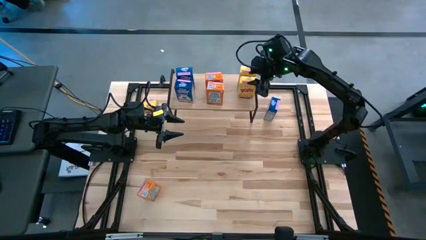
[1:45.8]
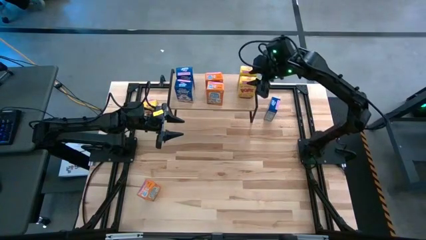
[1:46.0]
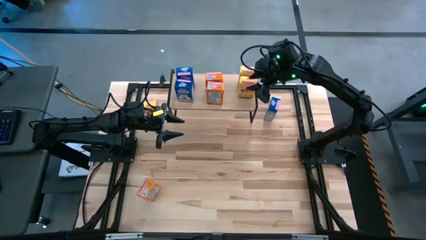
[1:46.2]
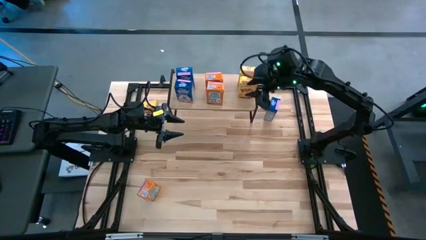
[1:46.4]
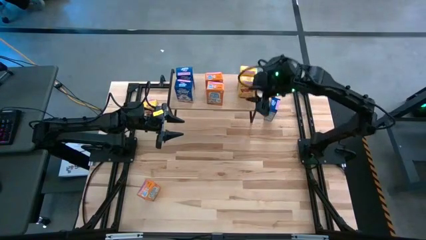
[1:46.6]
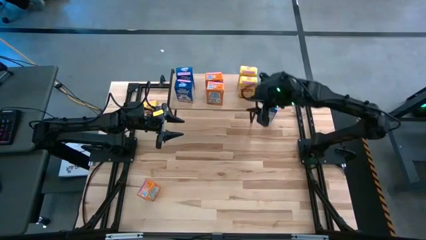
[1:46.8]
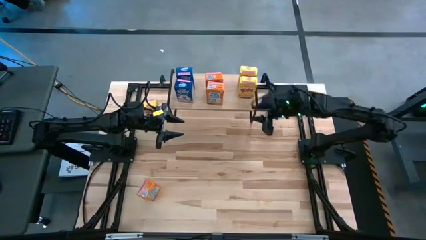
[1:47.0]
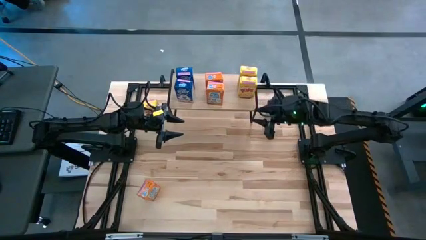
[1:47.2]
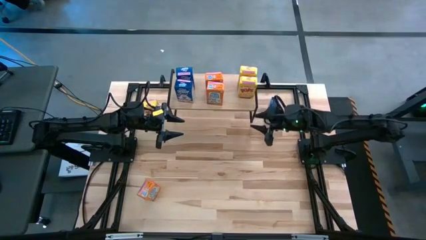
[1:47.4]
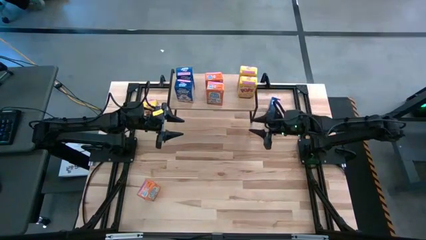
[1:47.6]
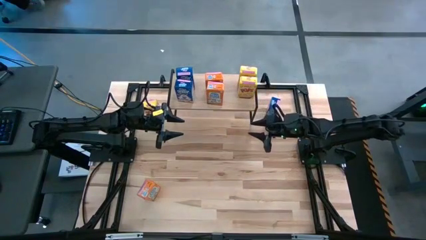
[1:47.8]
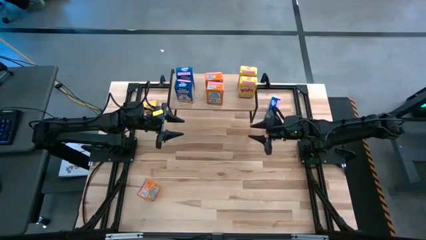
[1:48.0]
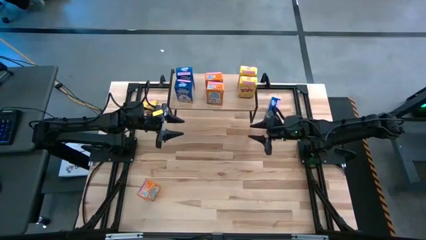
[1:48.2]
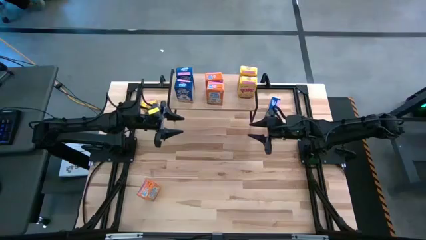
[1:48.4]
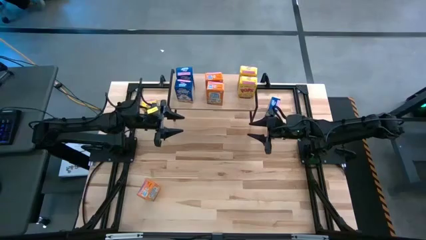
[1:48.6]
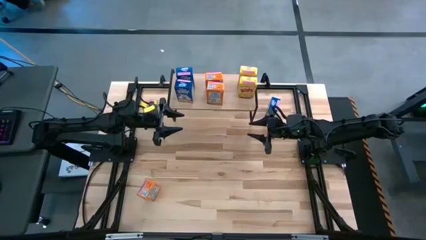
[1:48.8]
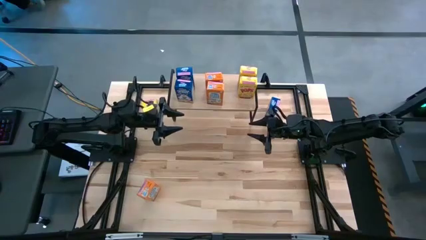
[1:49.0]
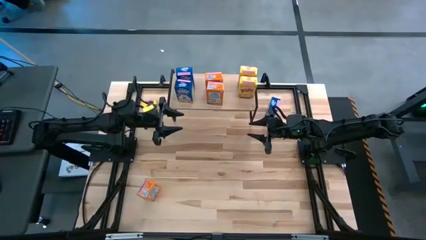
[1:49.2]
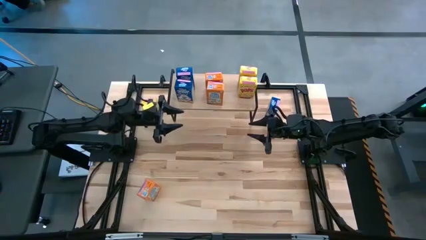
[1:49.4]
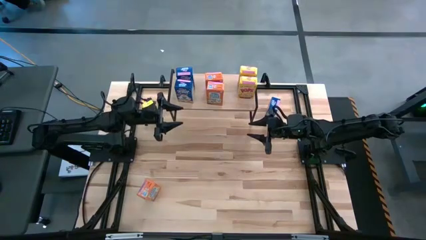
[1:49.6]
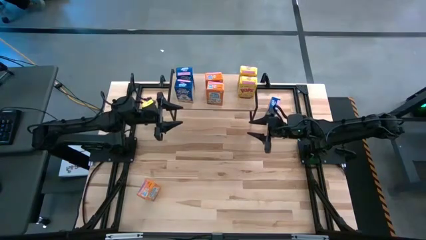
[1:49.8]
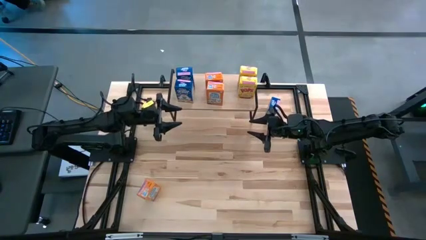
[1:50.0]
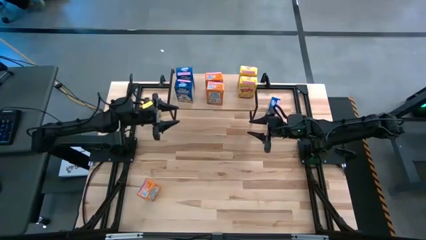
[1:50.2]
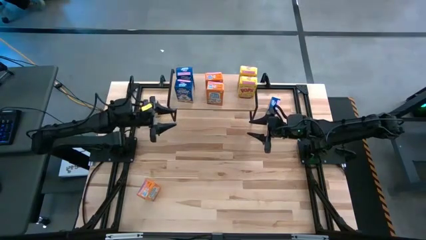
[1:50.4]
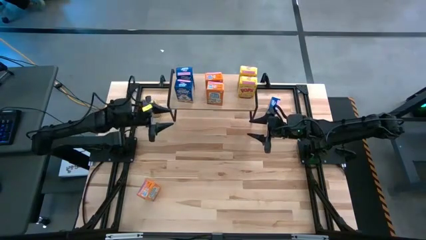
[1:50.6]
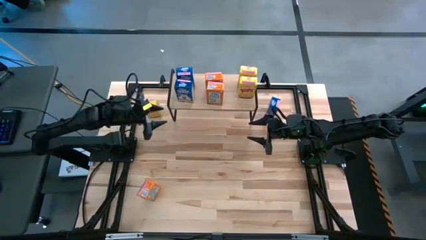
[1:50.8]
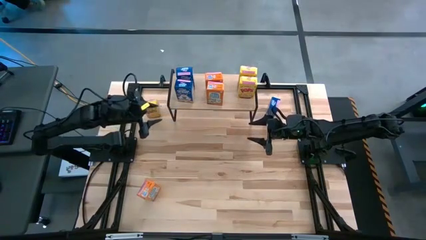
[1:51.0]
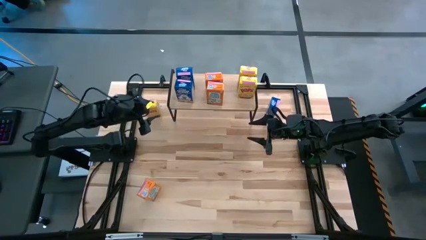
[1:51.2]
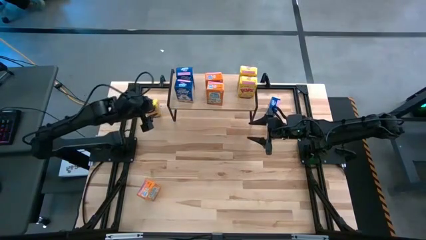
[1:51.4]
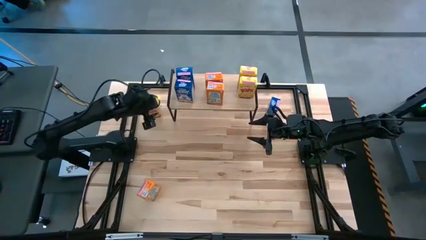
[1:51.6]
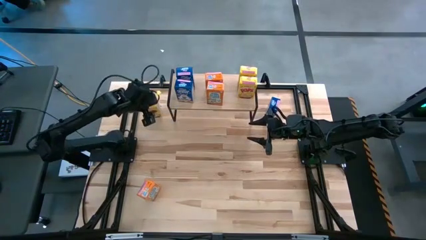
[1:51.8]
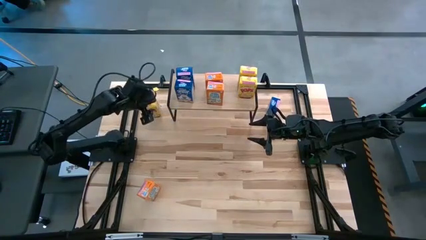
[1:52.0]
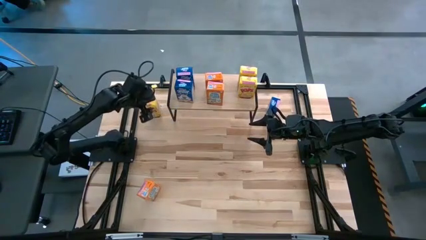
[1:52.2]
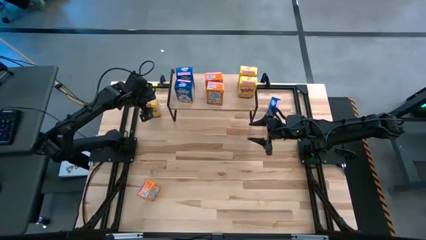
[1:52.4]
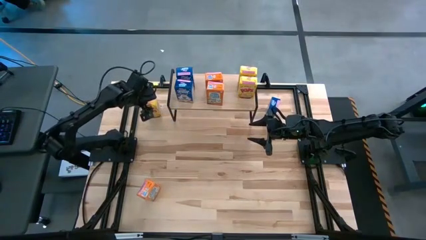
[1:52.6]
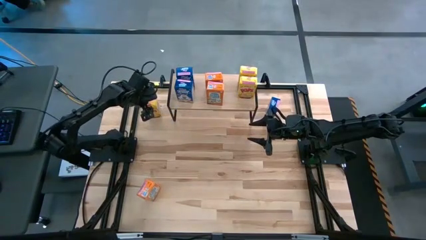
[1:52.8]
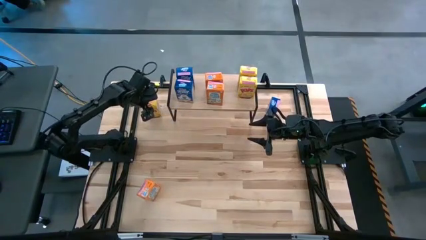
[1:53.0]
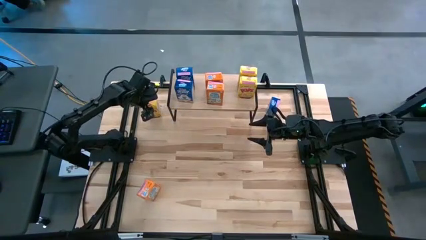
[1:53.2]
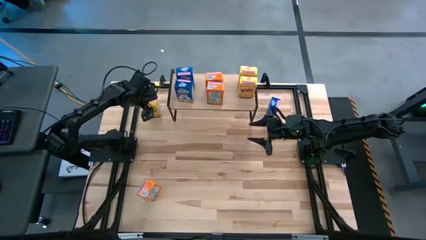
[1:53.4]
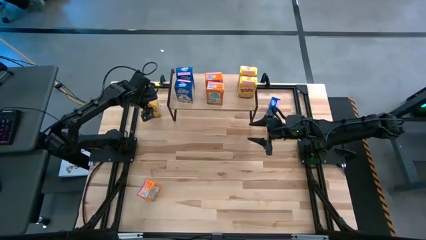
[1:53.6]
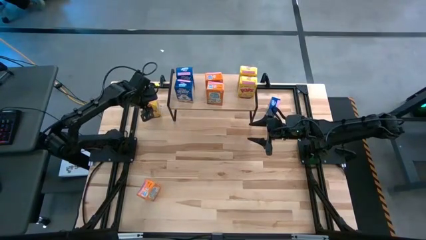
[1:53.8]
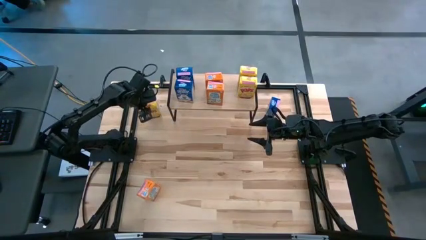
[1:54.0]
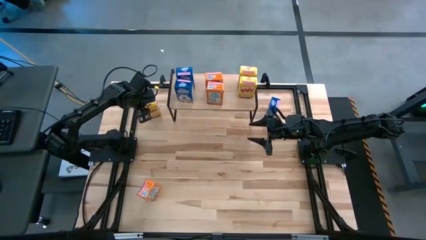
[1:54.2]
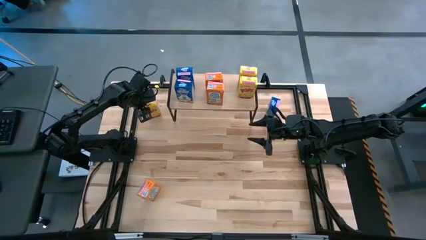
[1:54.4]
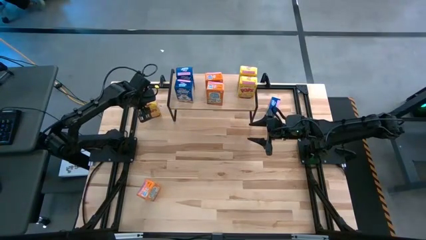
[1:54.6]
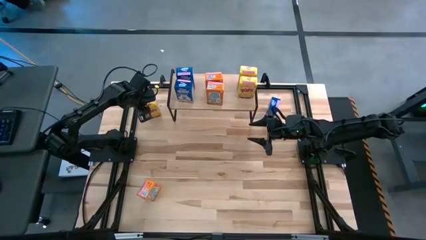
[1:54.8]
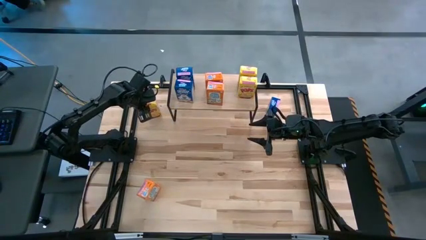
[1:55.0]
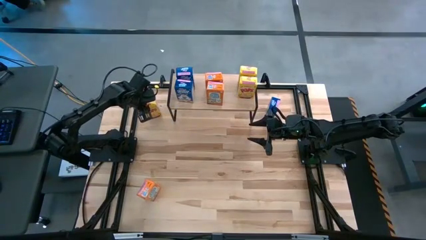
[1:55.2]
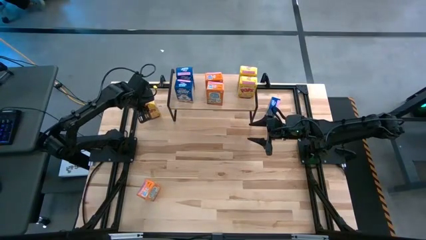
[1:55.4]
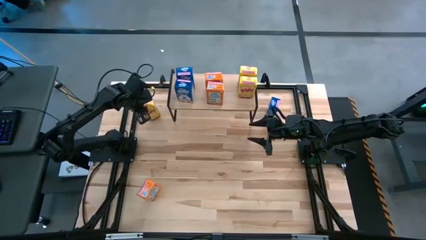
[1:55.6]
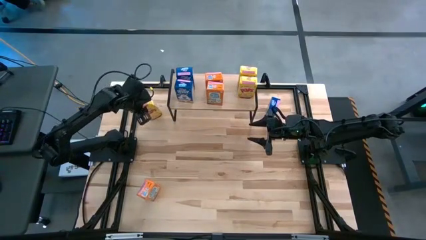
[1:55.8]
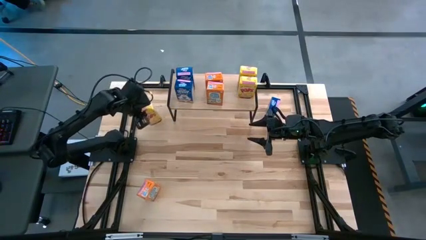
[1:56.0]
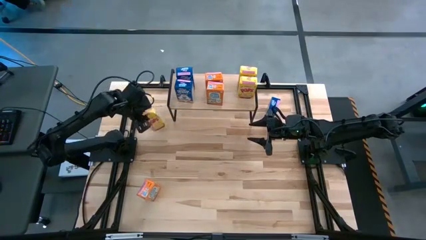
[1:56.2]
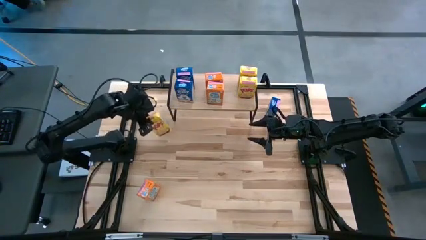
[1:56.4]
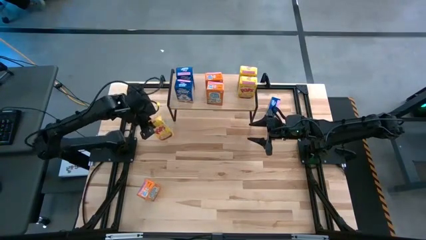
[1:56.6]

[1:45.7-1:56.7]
Task: Stack cereal on shelf
Put the yellow cereal box aligned with the other yellow cereal boxes on the shelf

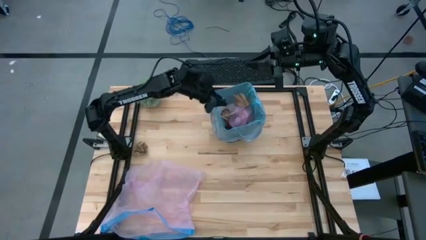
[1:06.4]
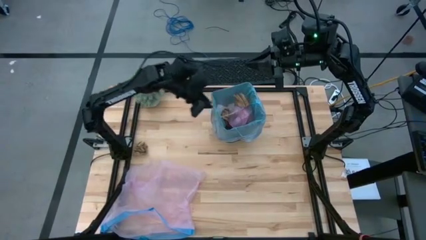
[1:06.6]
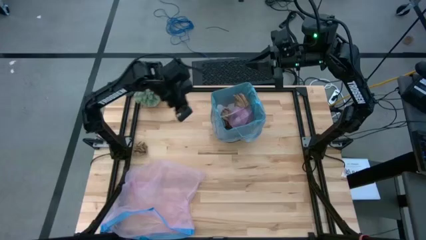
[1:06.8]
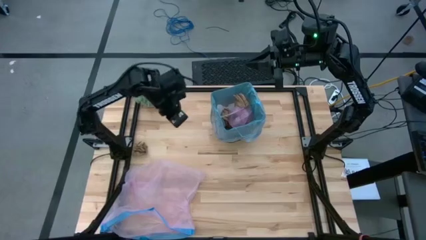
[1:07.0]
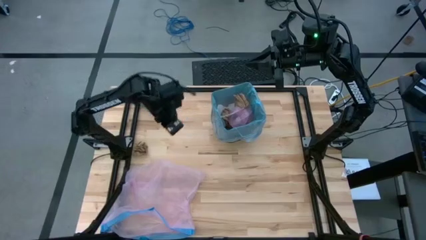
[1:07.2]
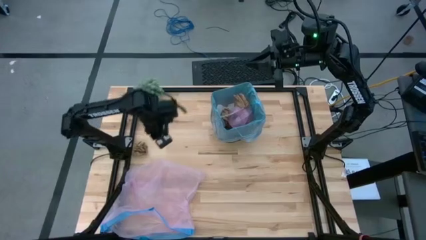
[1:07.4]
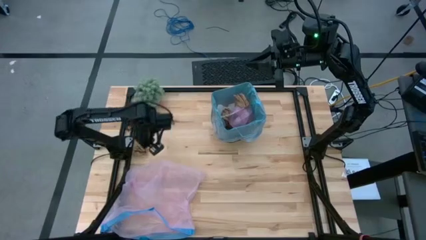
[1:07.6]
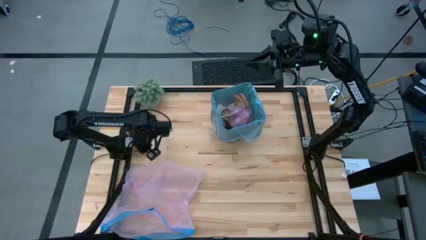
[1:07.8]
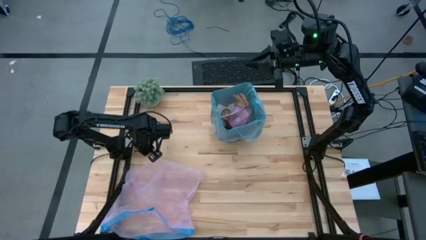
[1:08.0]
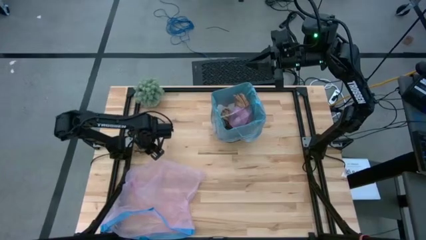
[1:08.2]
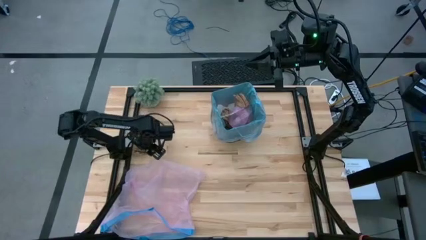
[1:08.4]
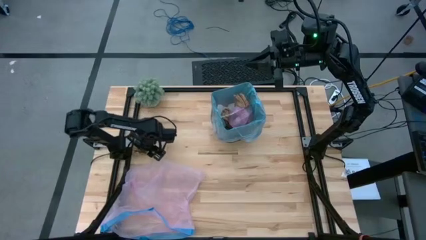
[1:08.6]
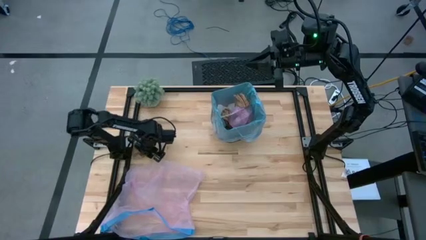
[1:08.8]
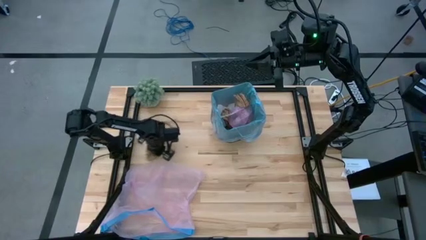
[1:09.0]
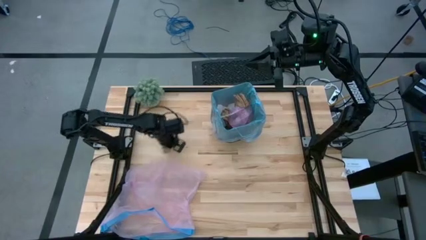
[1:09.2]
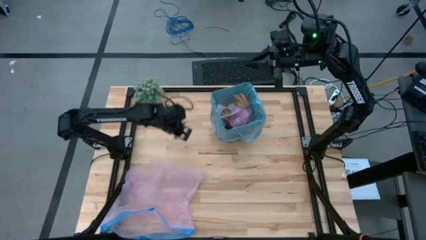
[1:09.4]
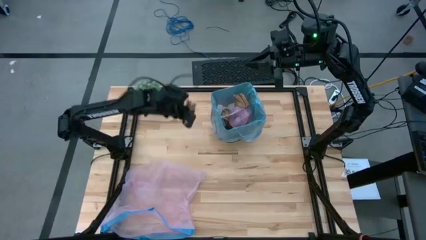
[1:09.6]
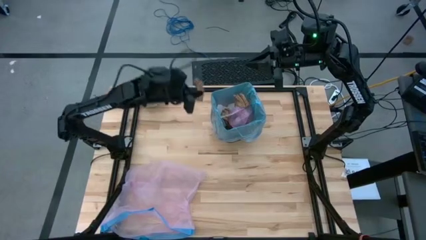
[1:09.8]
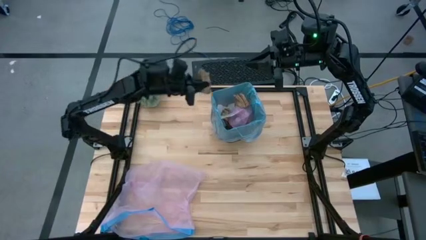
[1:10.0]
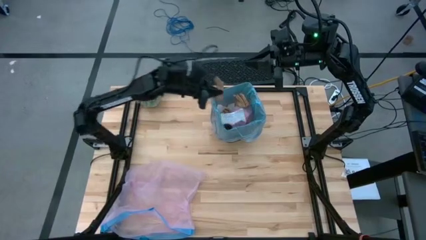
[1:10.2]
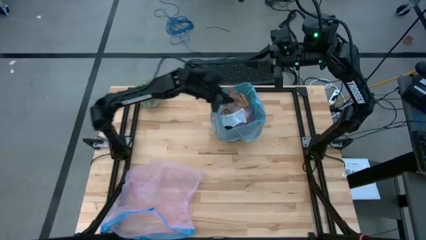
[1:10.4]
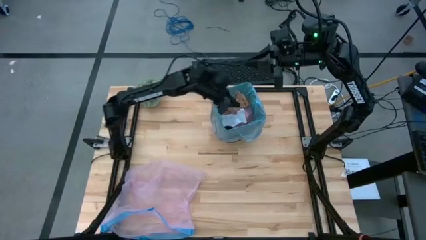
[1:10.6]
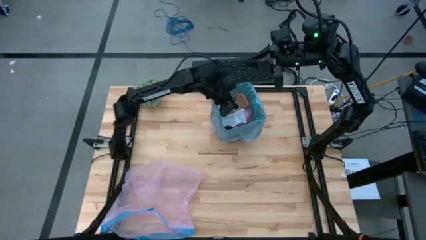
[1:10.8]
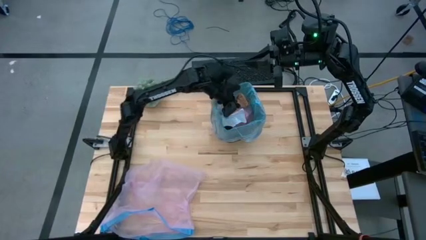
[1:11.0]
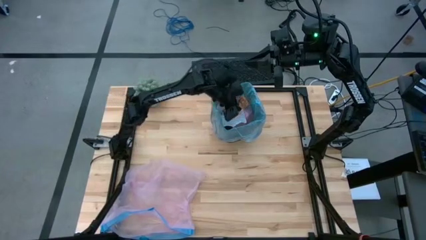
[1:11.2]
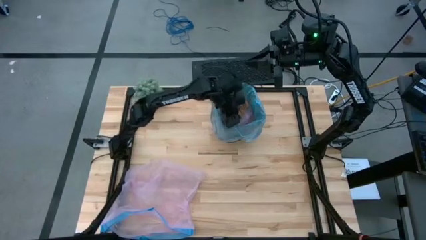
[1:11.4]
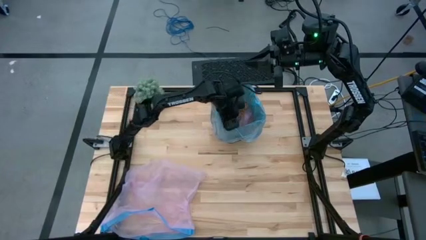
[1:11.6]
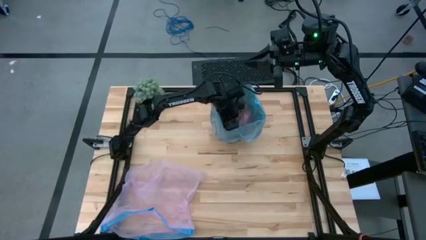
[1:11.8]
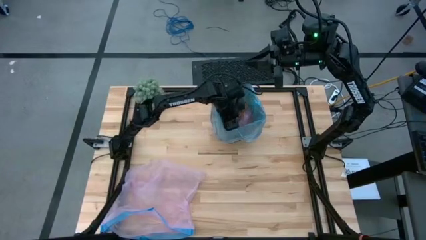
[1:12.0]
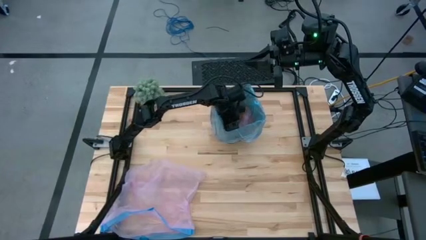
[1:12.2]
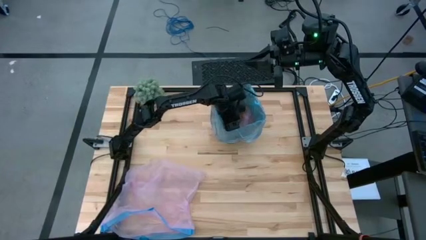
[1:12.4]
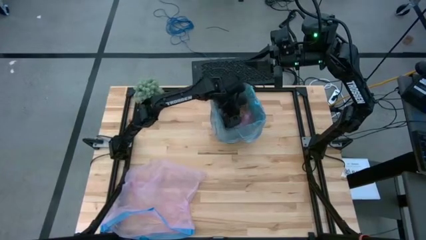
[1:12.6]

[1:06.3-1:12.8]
Task: place trash/remove bag and relplace
Put the brown napkin into the trash bin
